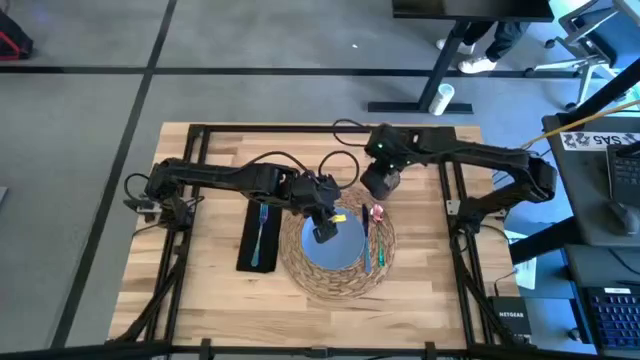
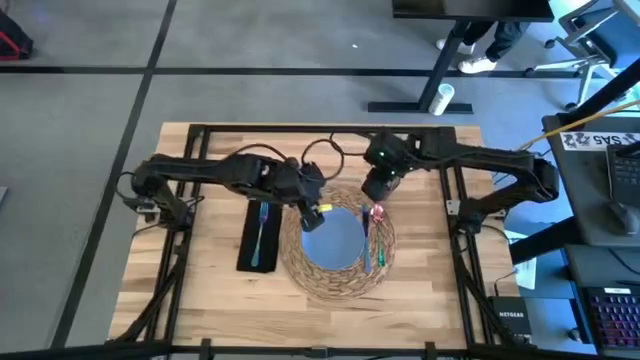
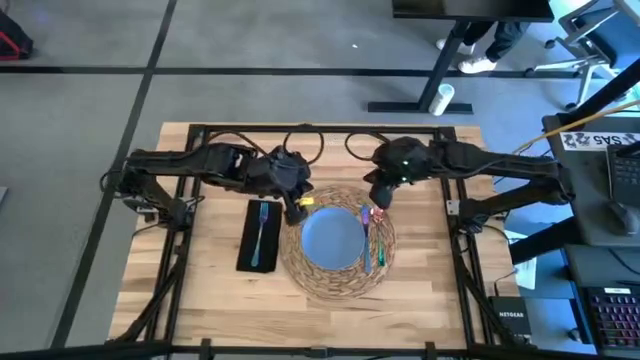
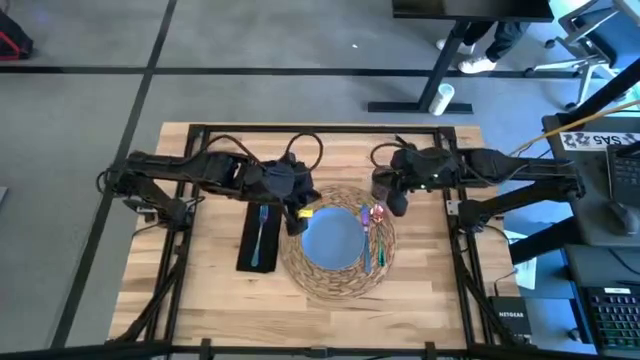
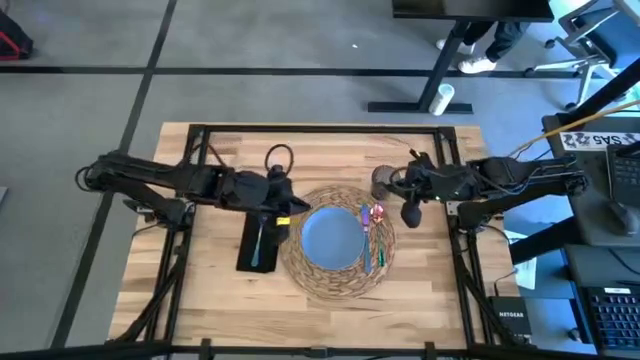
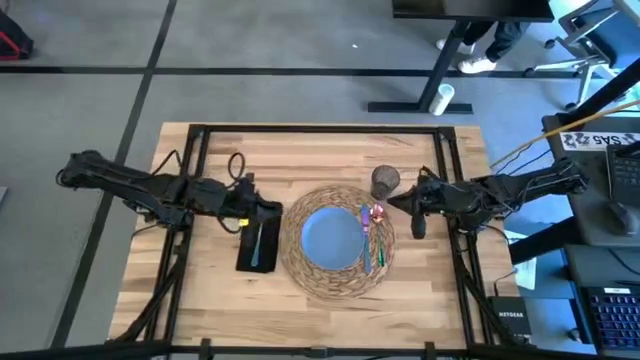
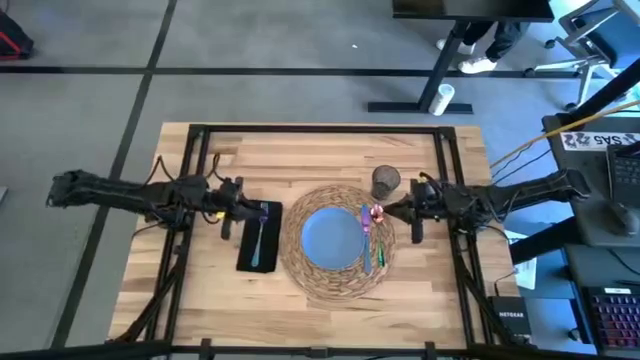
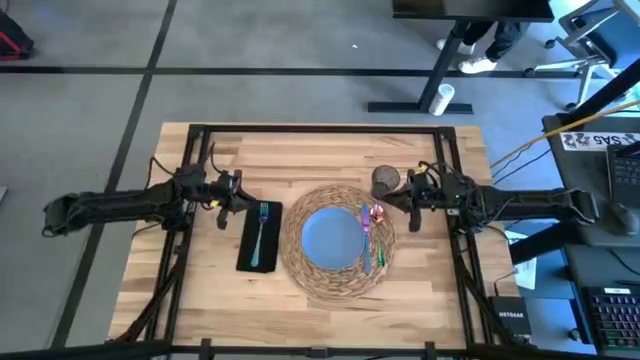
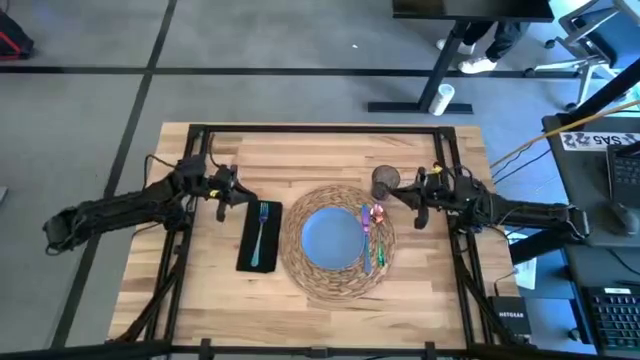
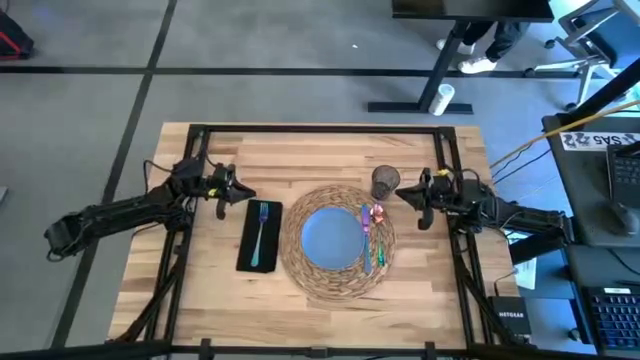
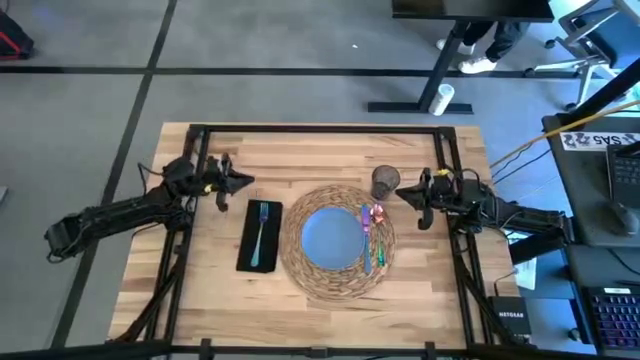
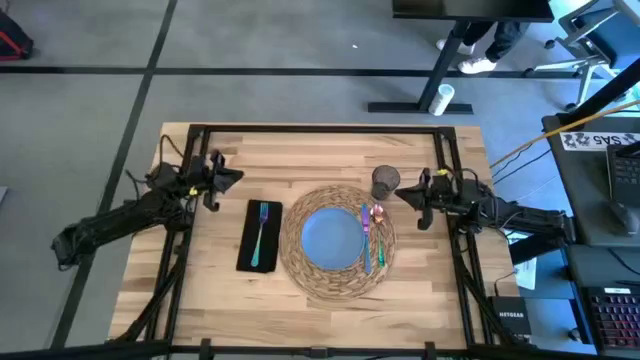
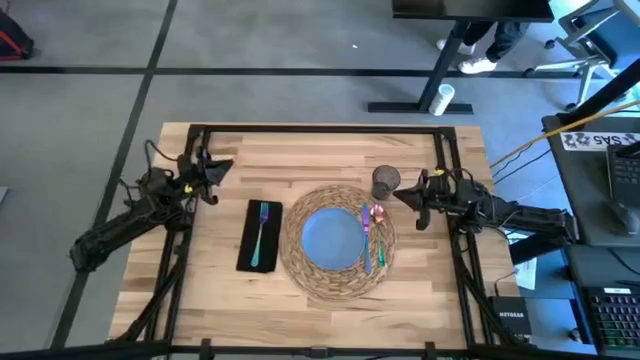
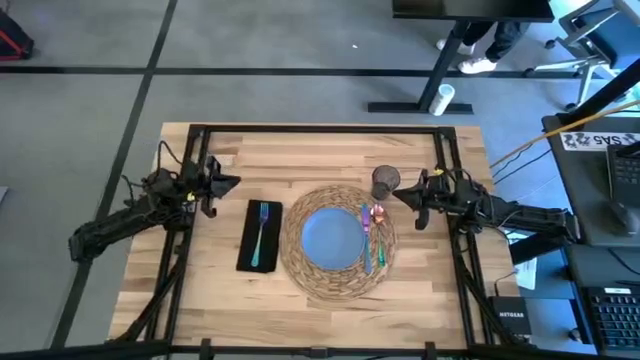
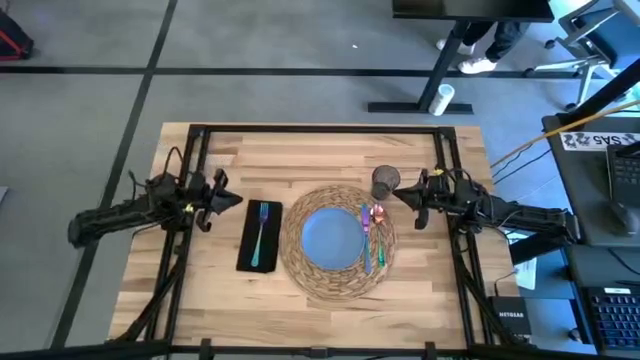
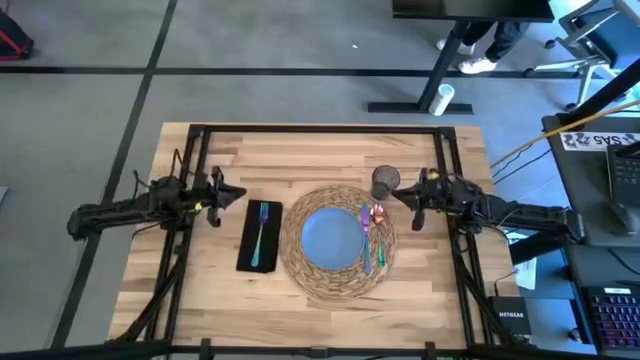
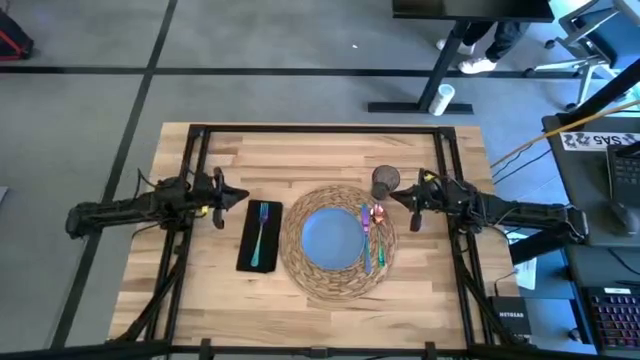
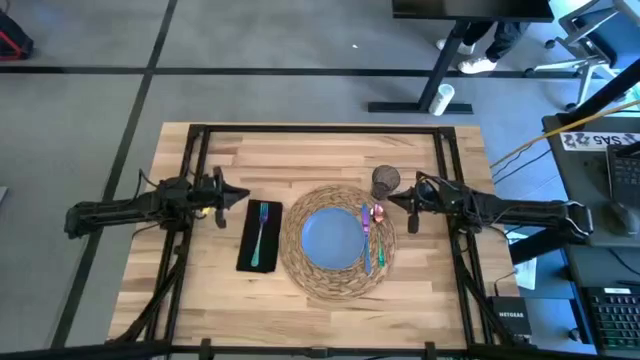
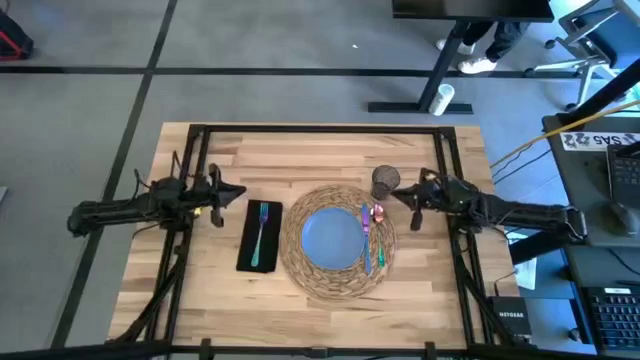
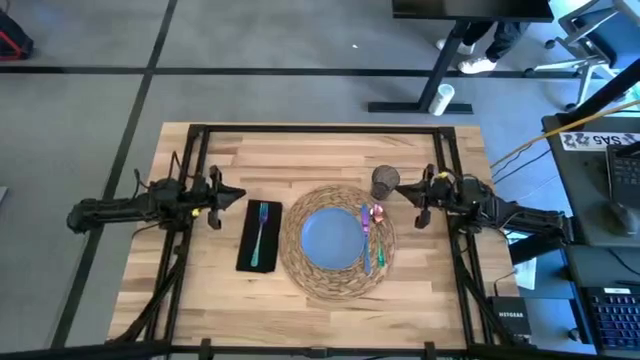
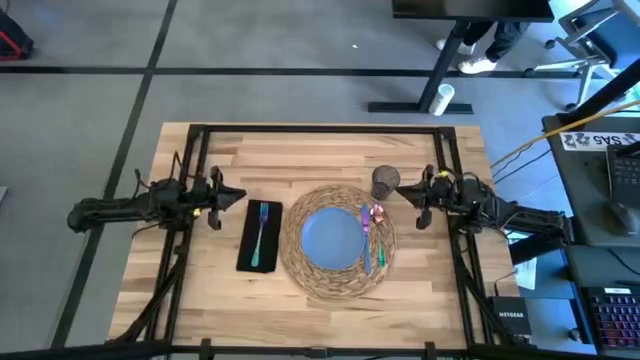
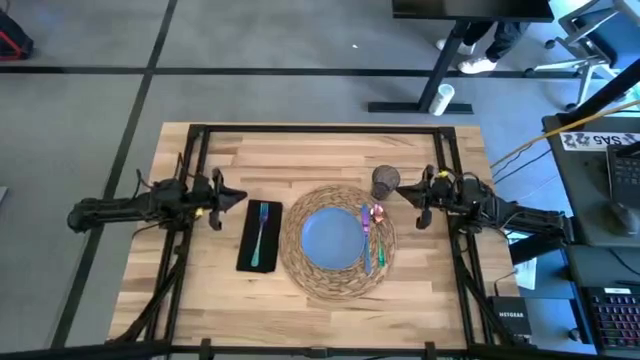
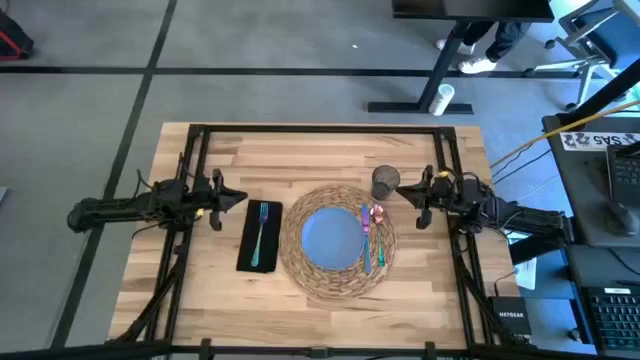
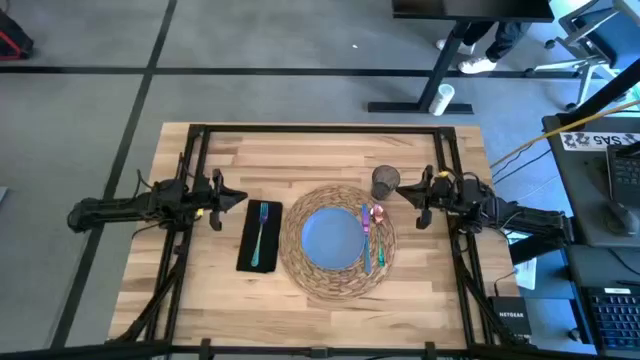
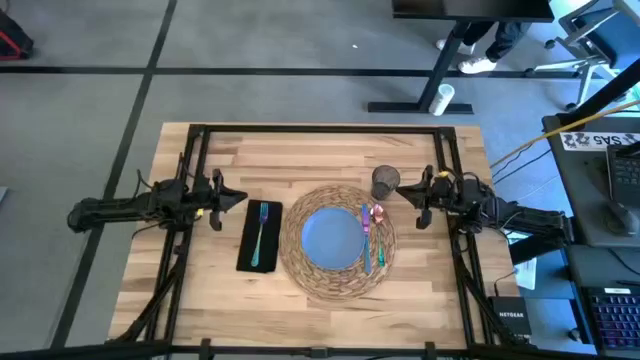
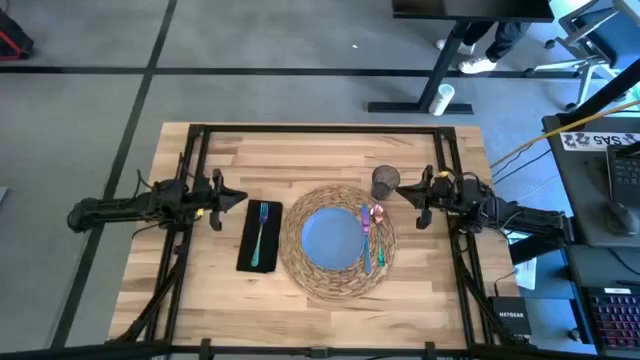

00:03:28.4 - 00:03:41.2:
Task: Set table place
Return to Home Position

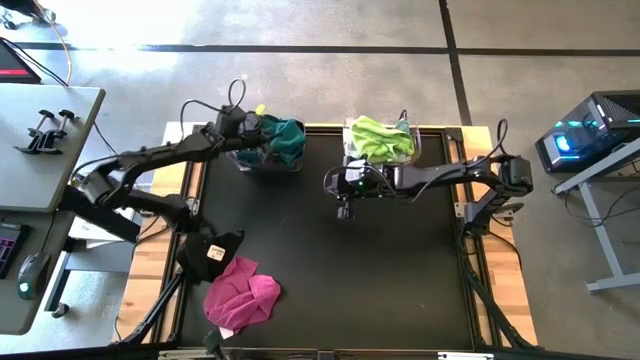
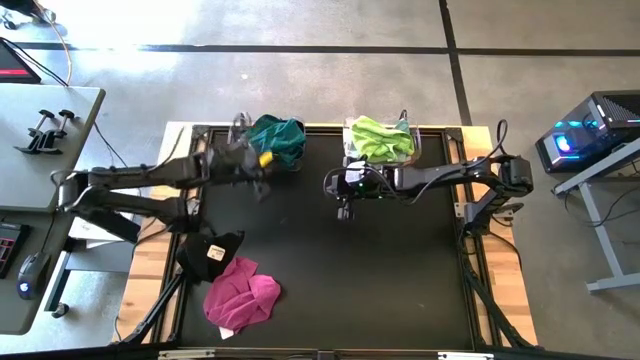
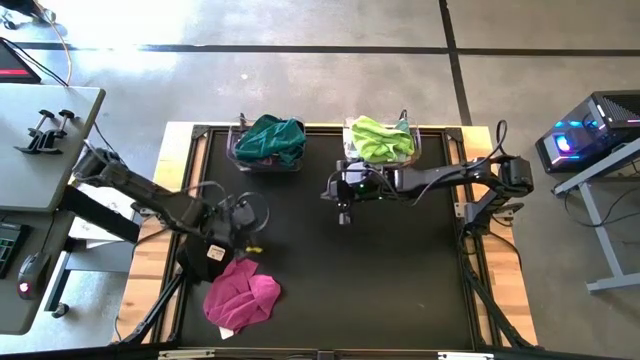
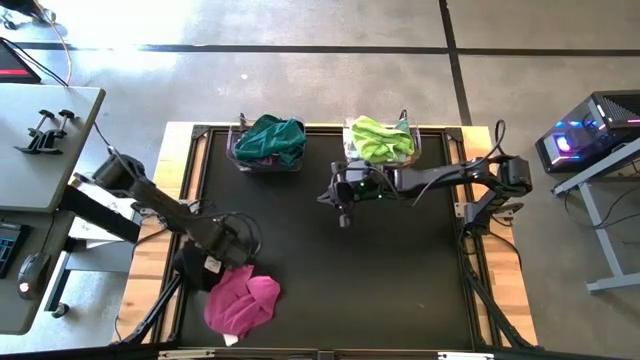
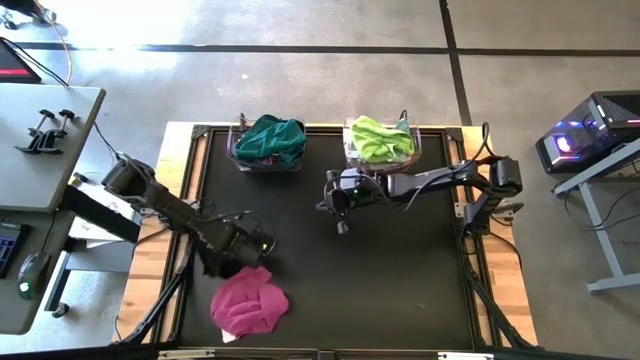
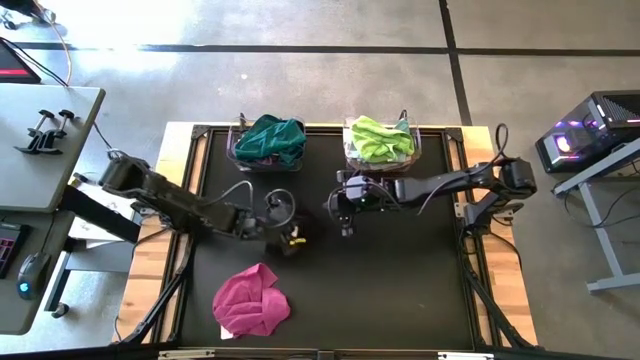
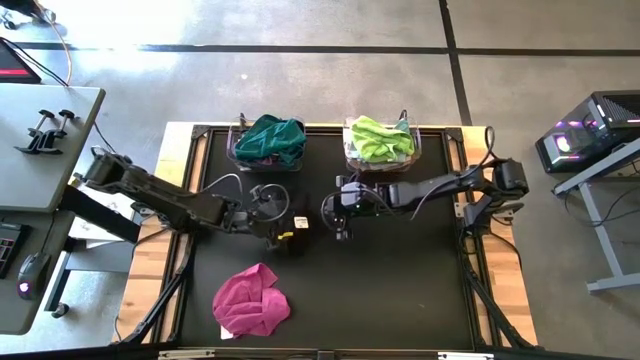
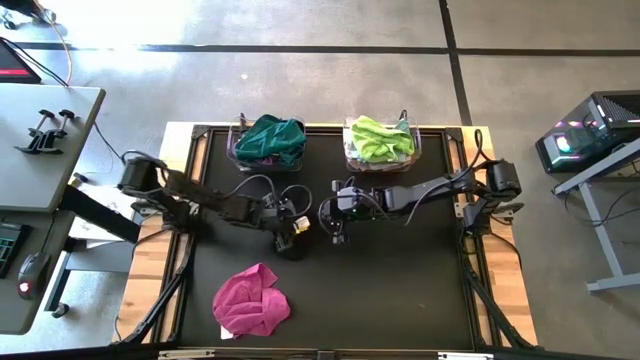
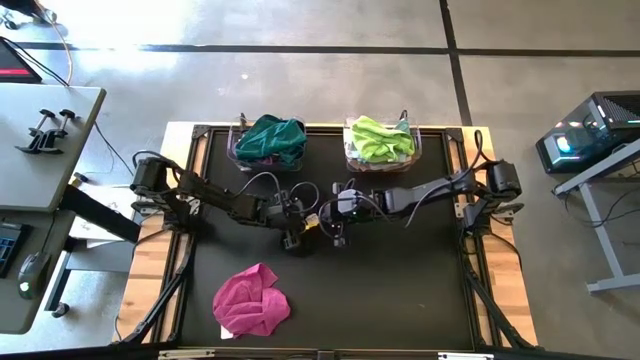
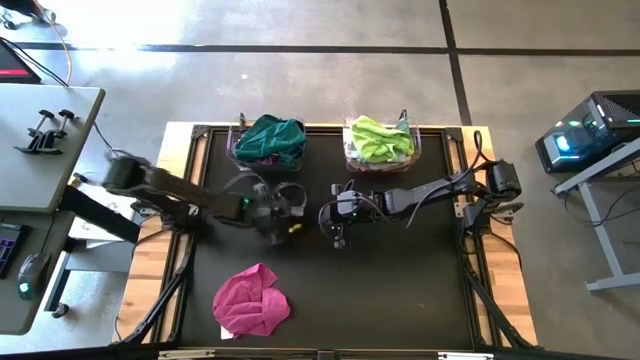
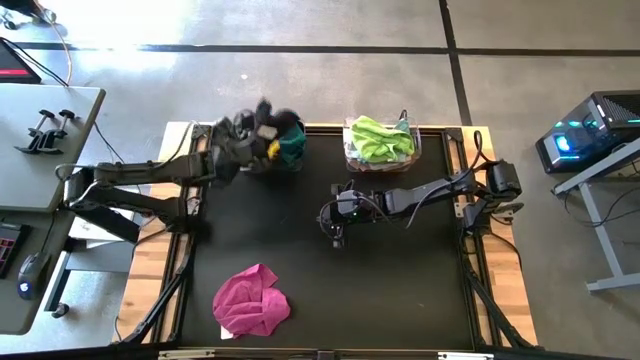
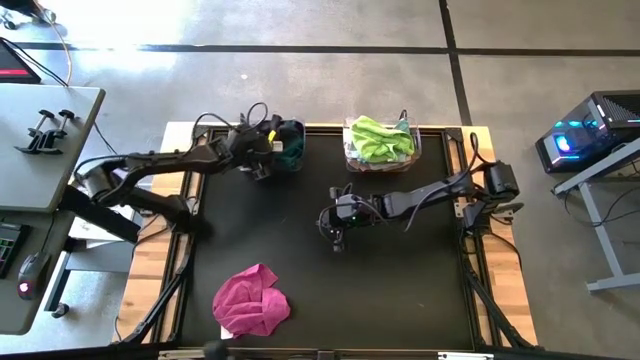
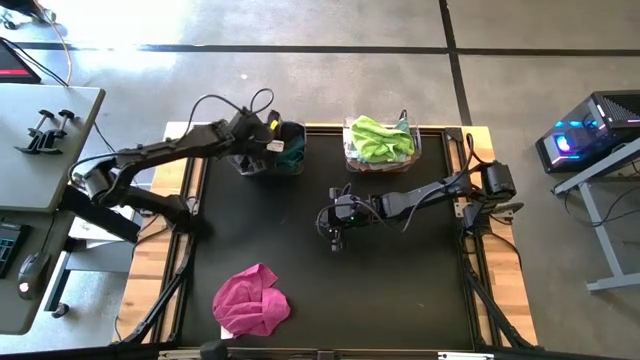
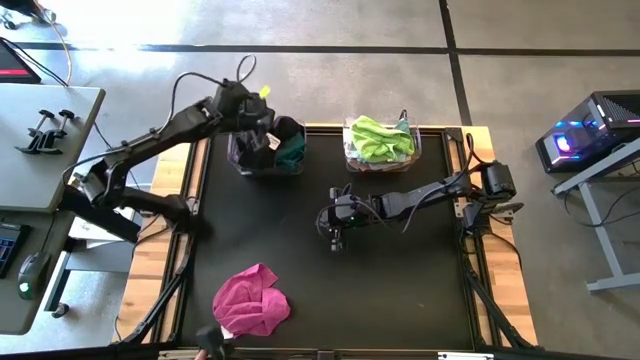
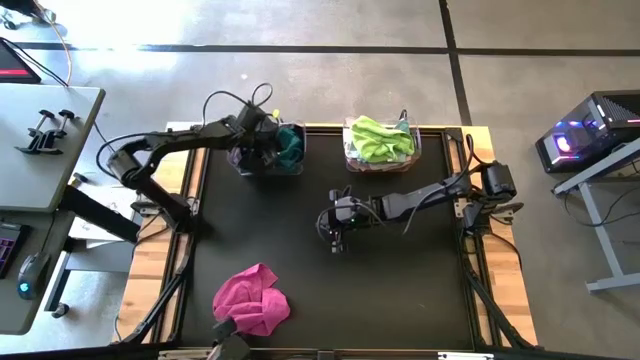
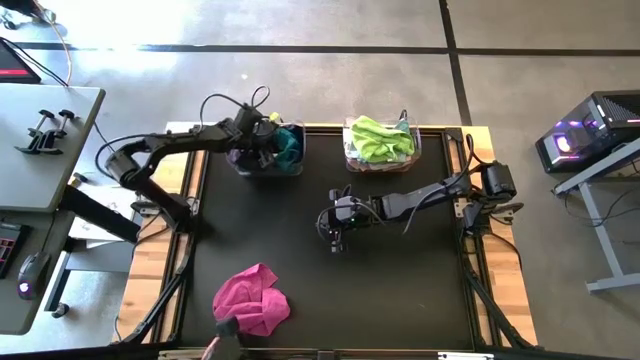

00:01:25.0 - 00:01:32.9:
Task: Sort towels by color in basket
Put the black kitchen towel into the left transparent bin
